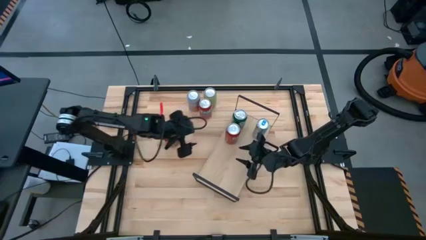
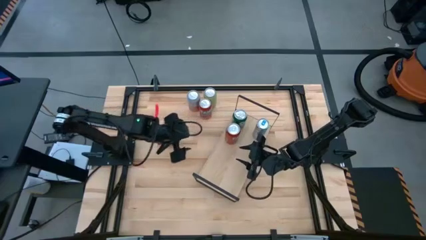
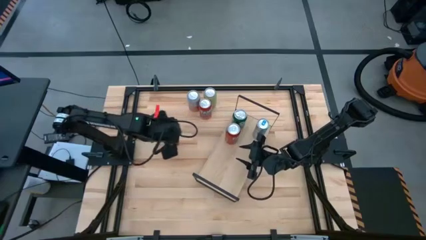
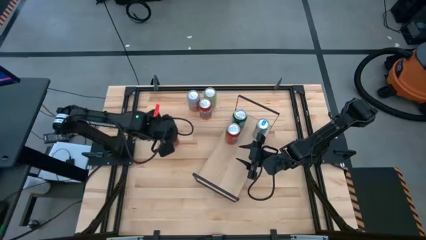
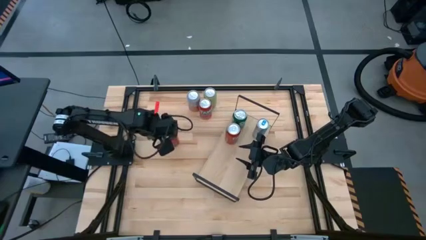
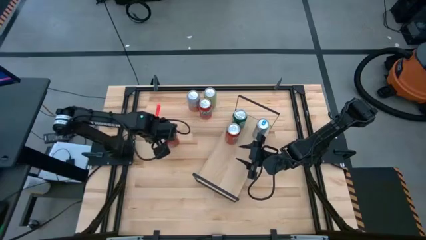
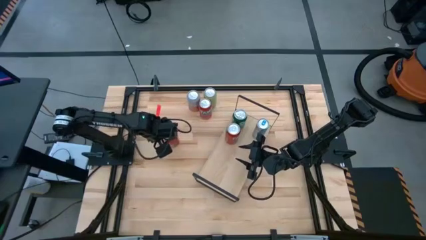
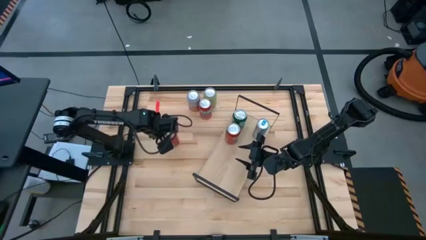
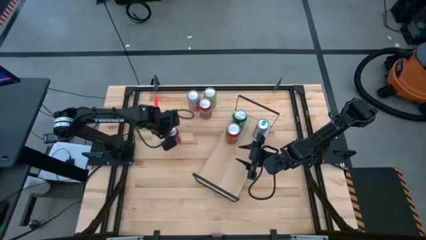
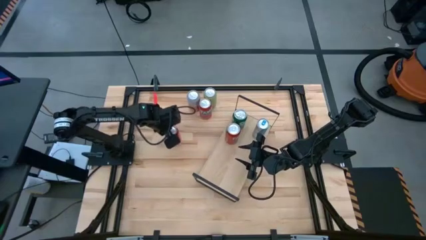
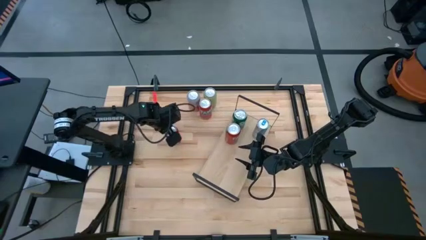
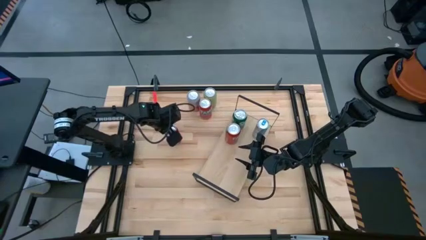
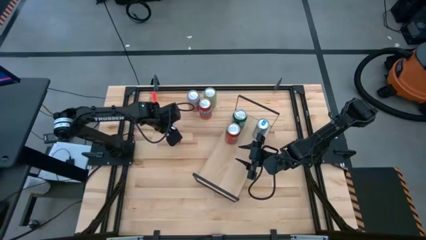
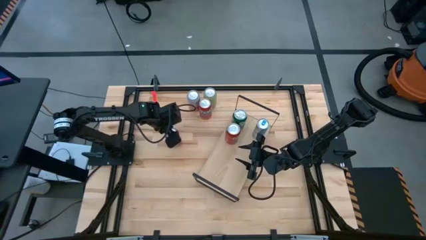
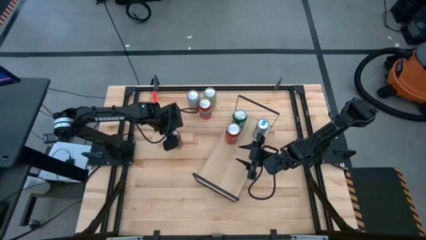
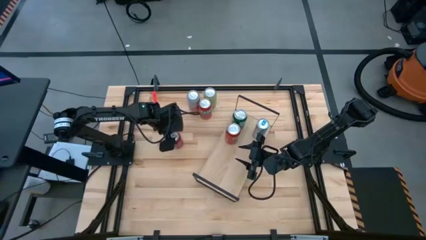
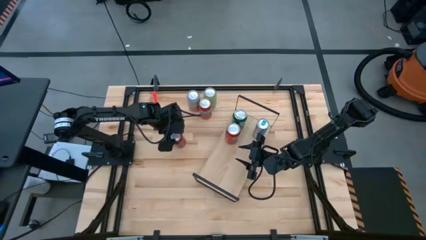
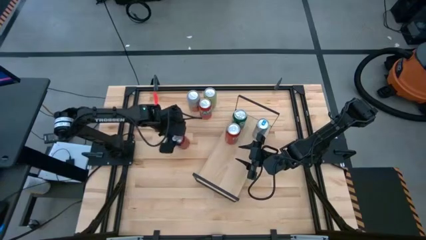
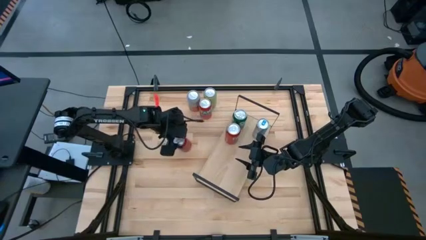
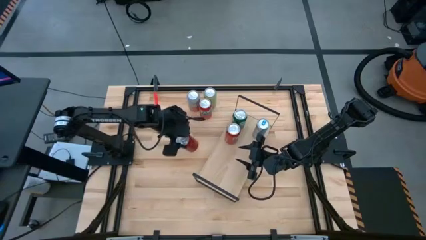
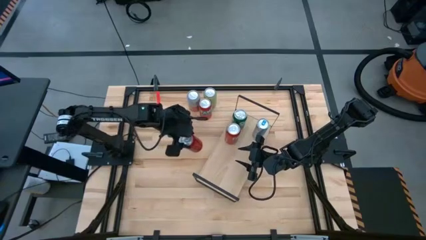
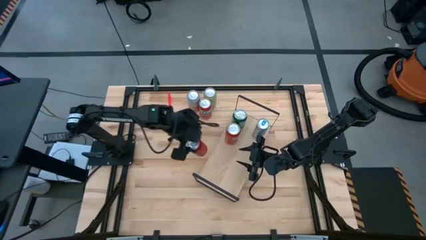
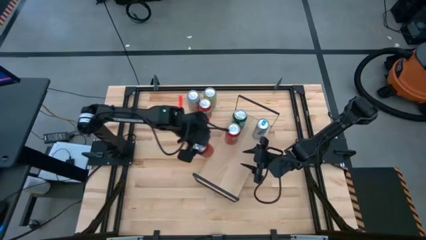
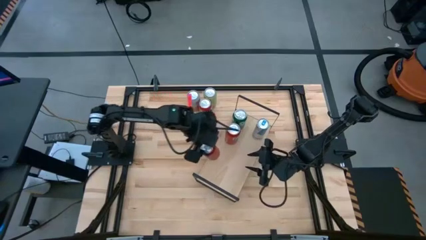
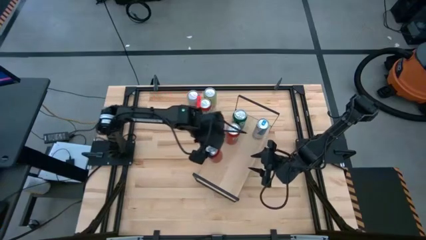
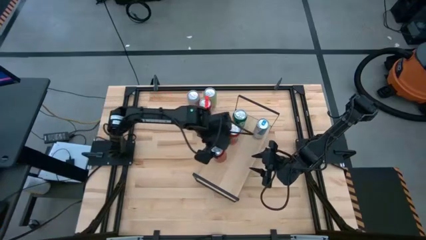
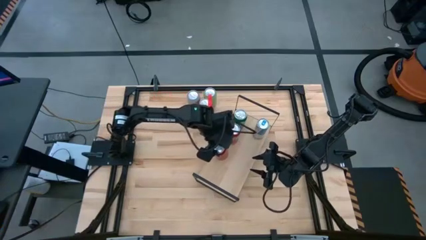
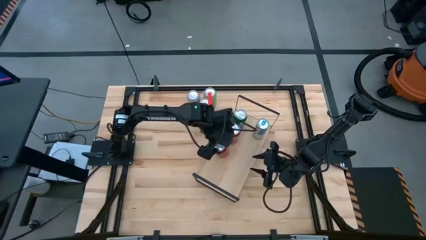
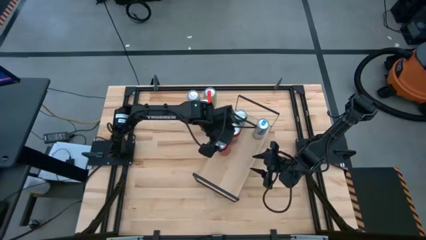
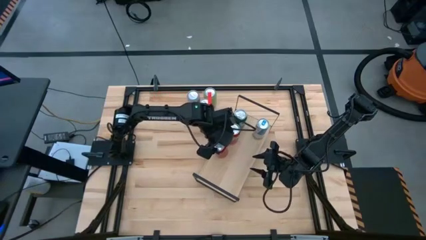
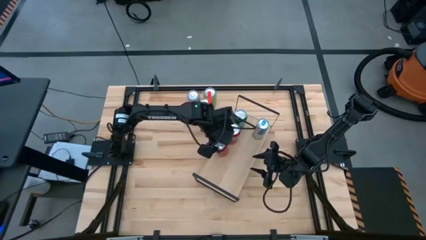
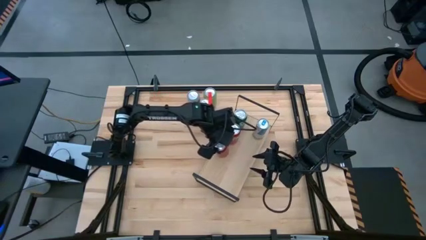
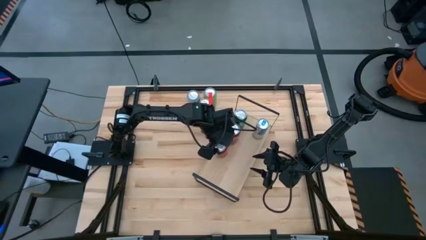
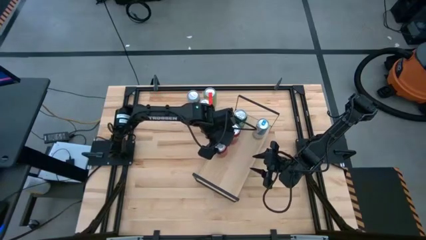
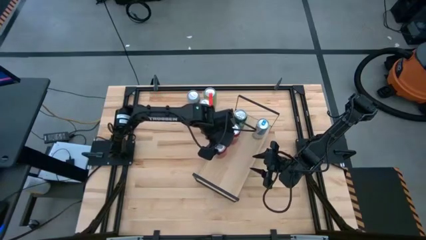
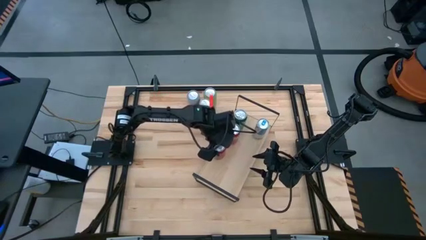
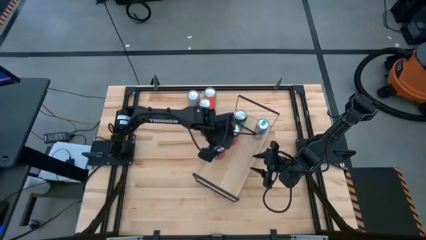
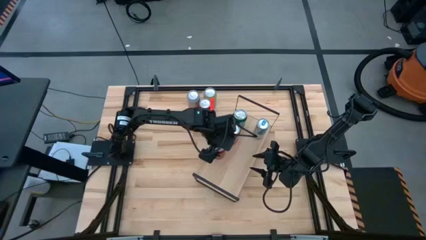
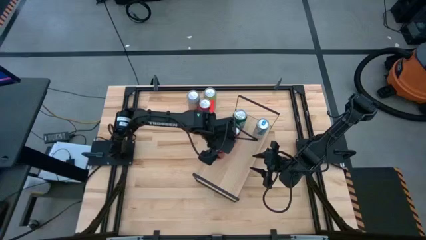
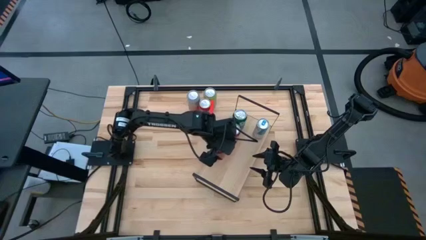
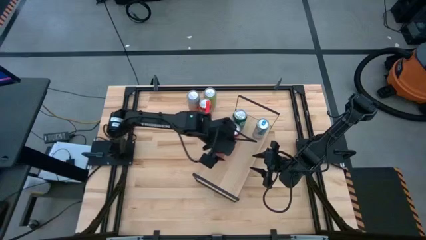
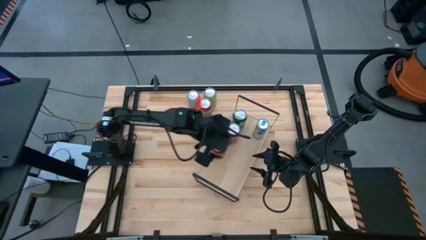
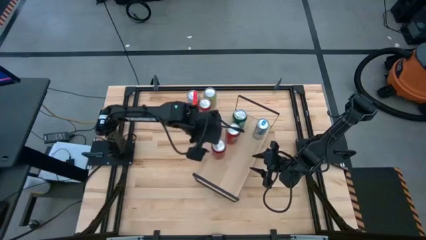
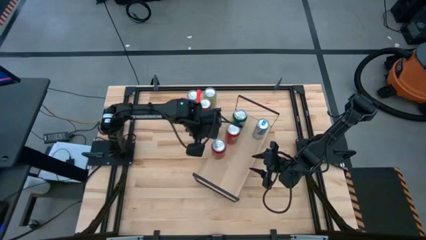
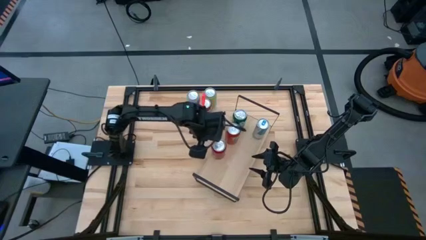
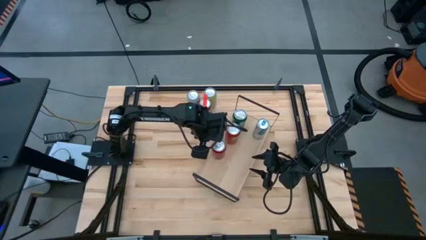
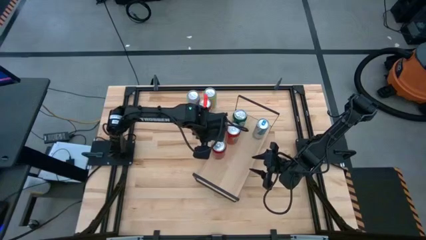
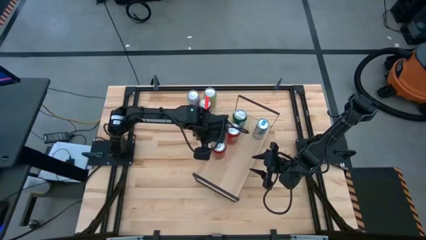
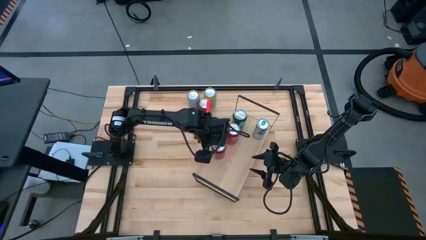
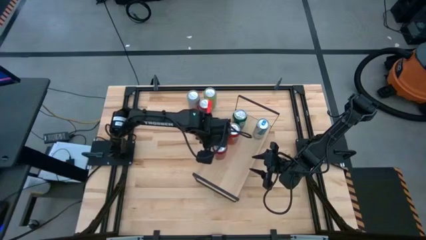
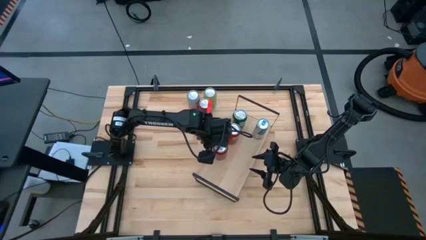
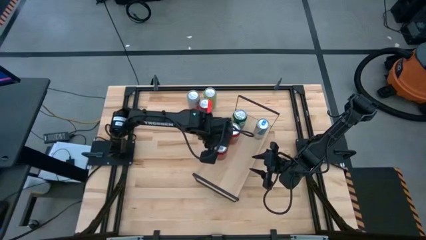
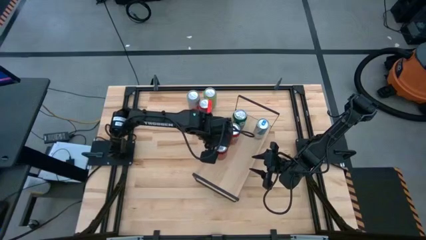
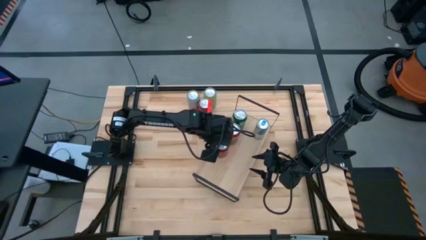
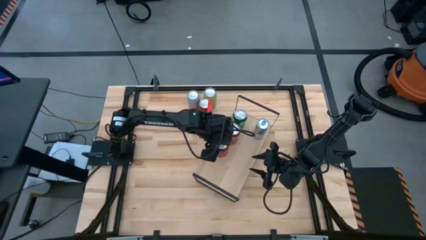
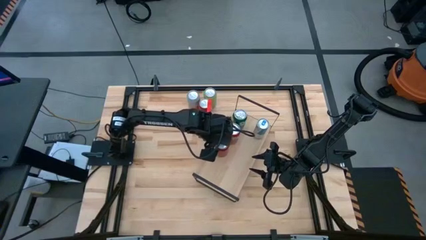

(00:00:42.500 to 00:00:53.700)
Task: Place canned beverage on shelf
Put the red soda can on the shelf

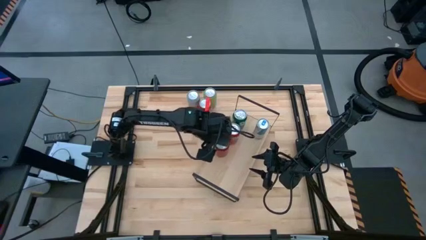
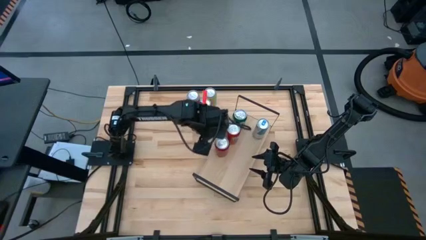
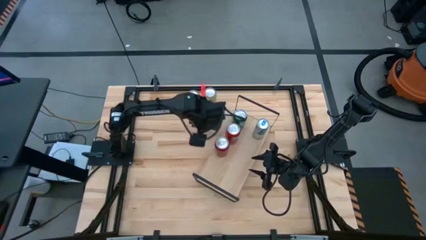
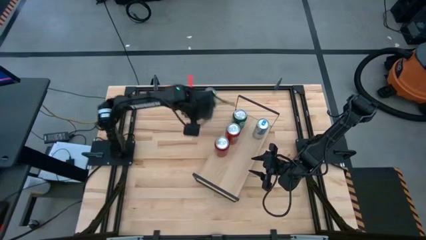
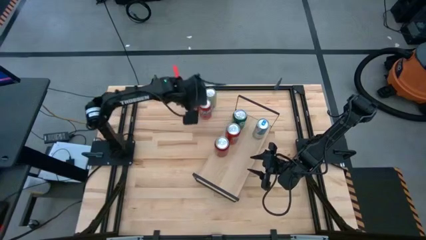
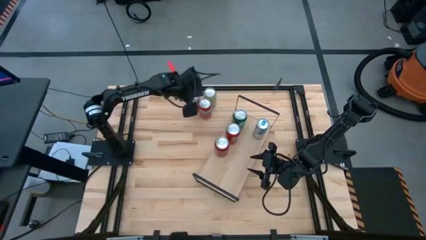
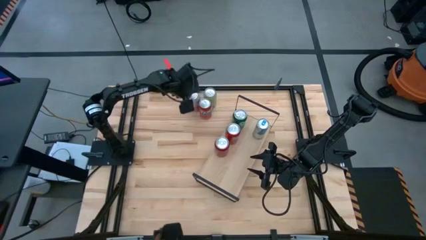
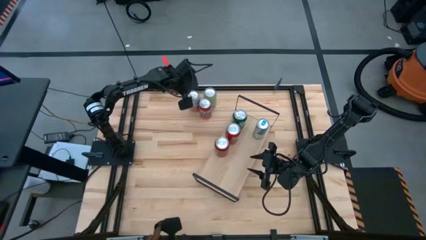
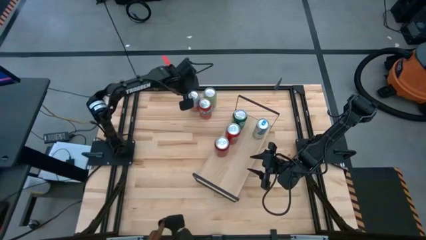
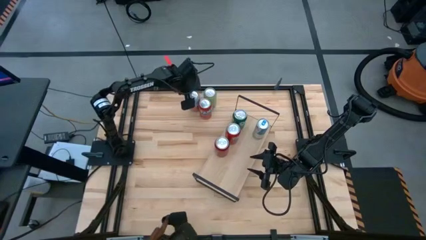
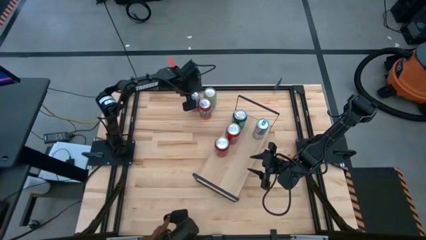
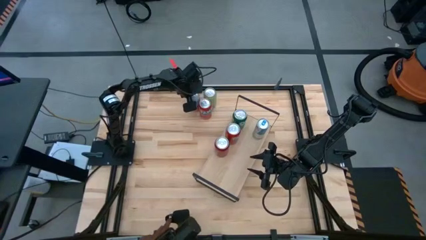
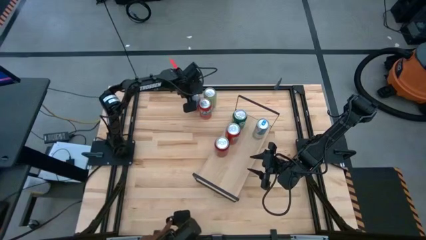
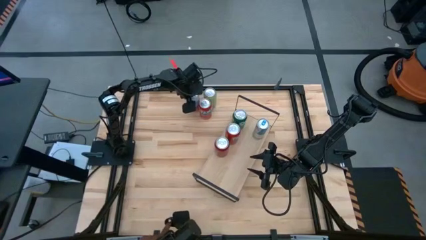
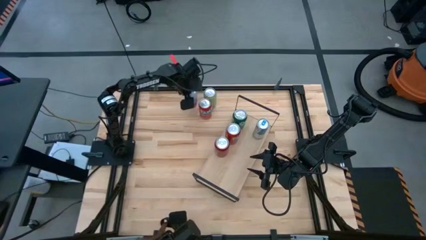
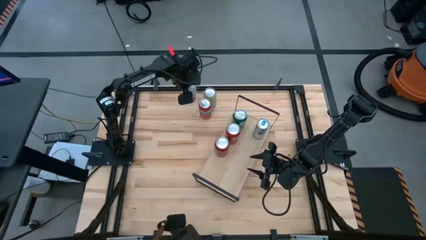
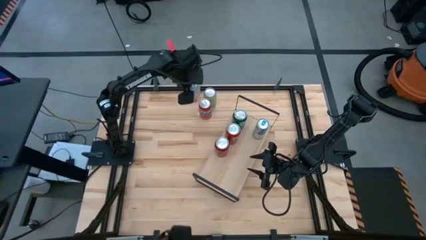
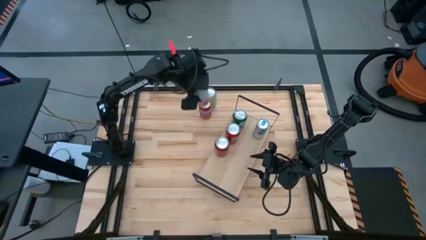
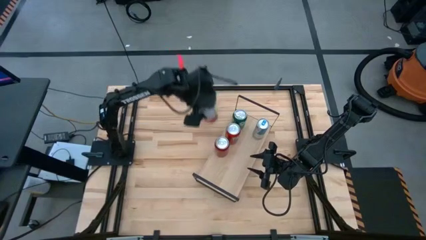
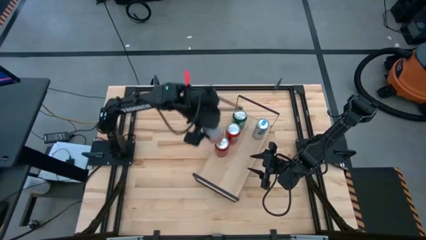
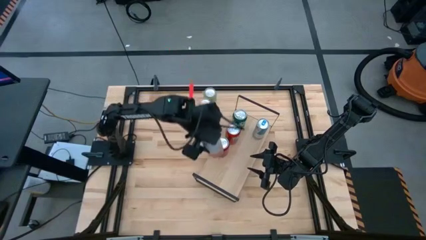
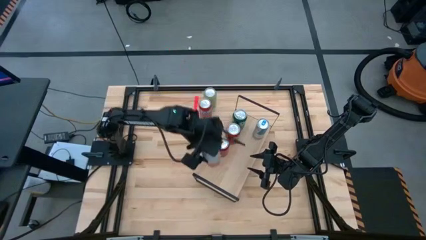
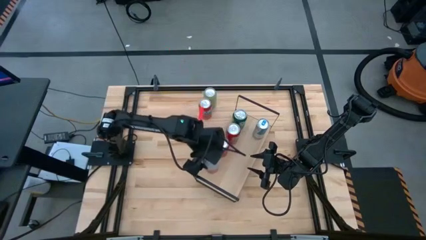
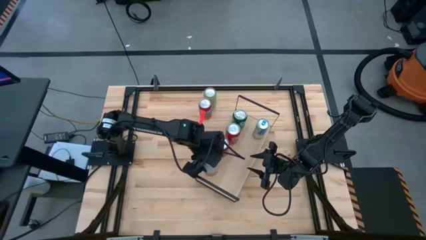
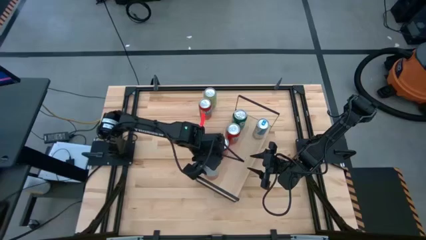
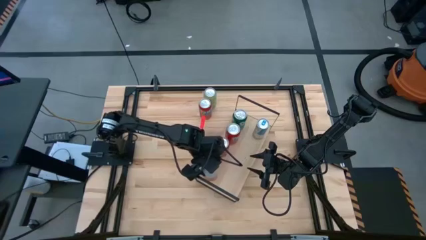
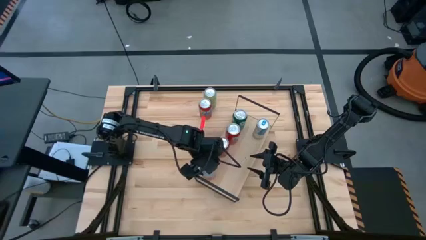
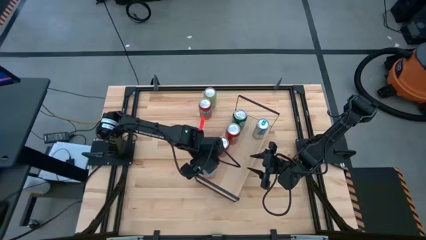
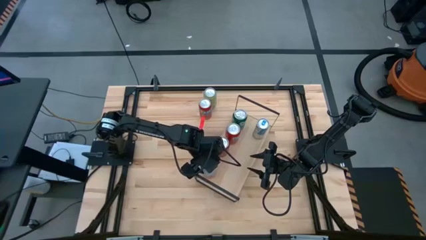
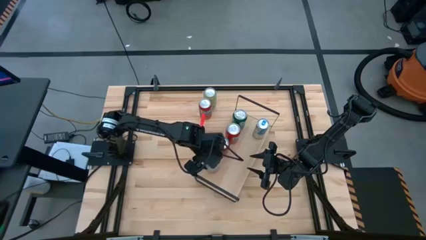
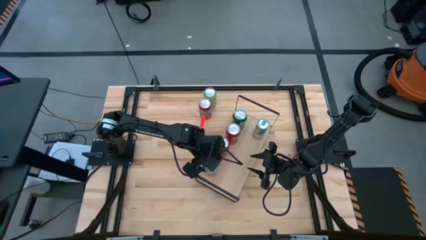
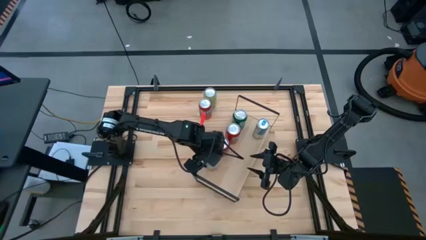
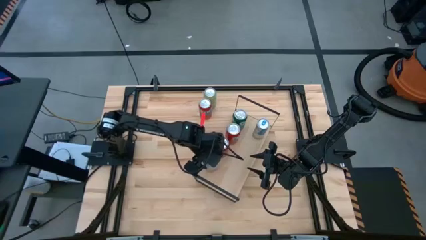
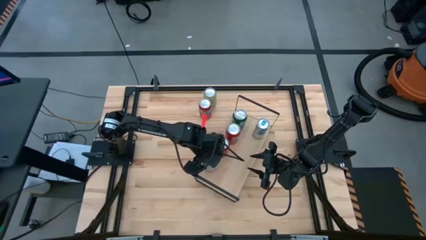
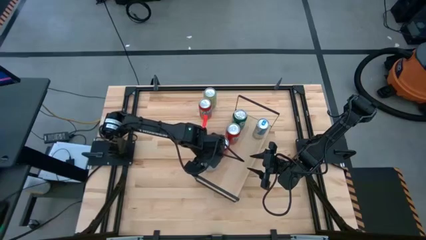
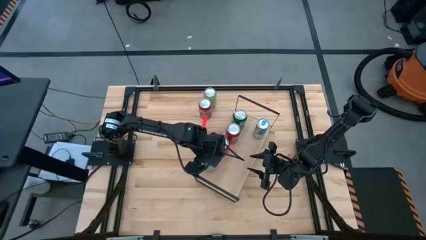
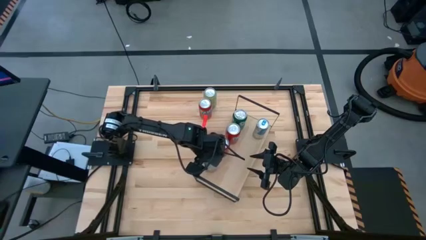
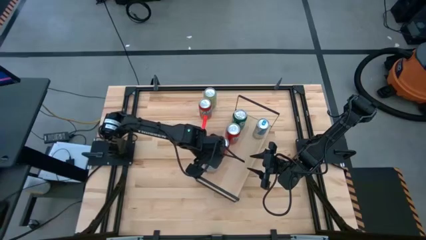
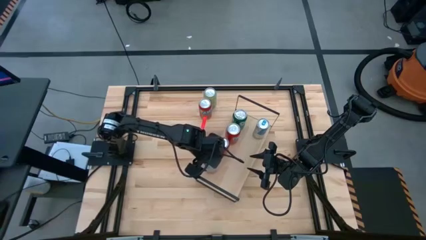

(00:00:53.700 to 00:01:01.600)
Put the white soda can on the shelf
